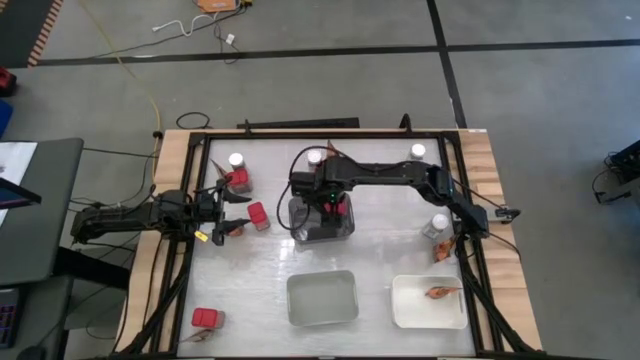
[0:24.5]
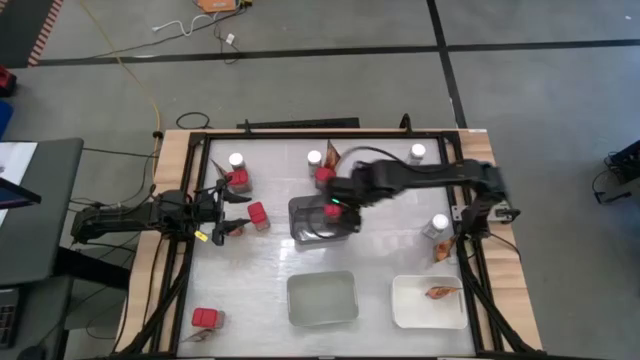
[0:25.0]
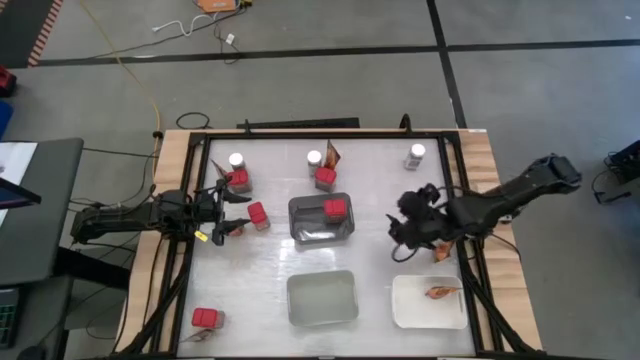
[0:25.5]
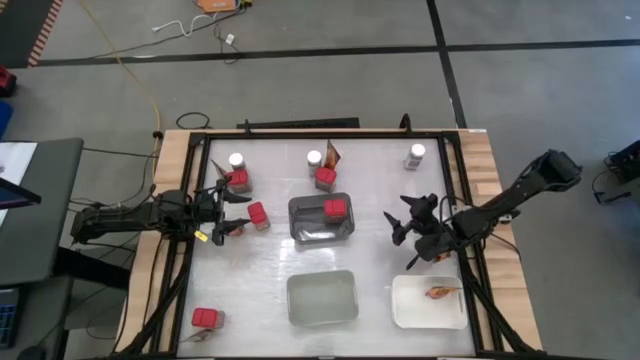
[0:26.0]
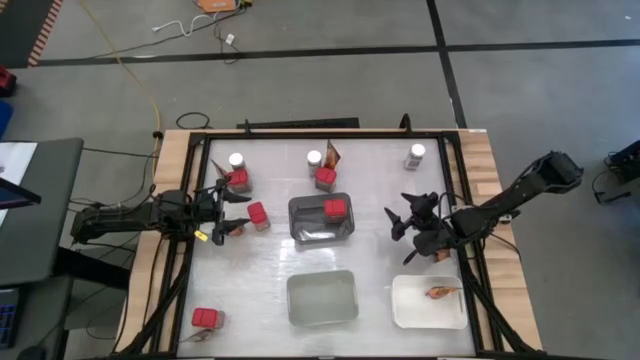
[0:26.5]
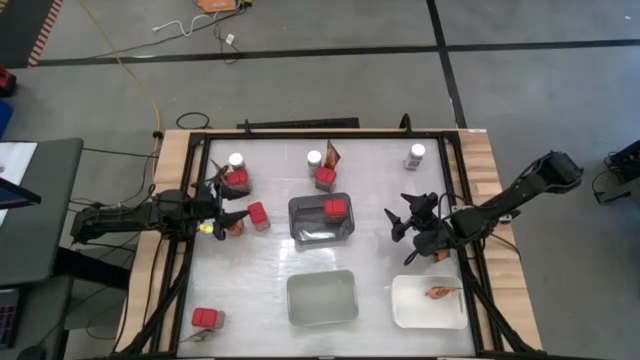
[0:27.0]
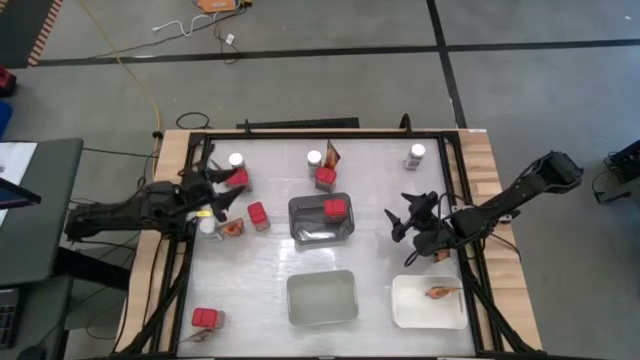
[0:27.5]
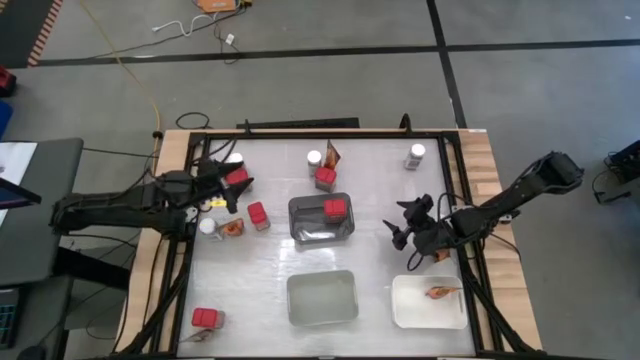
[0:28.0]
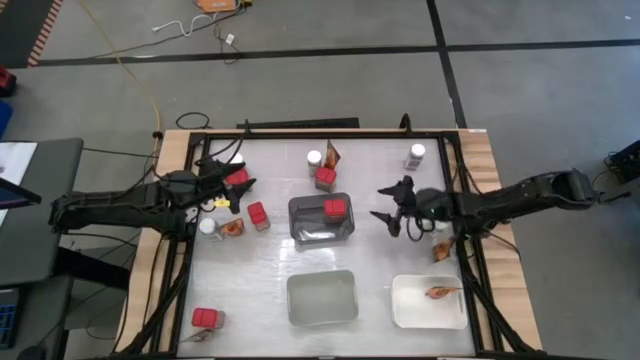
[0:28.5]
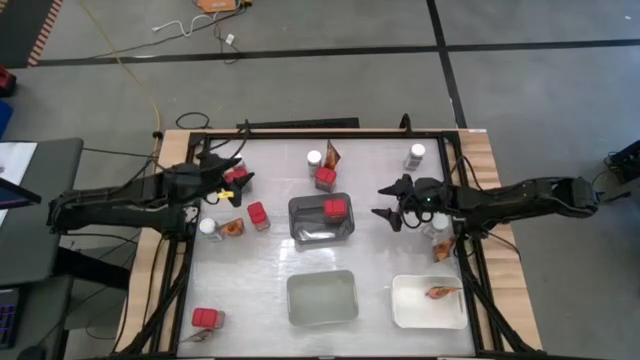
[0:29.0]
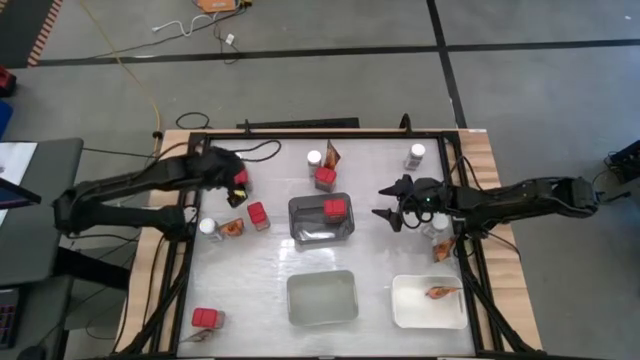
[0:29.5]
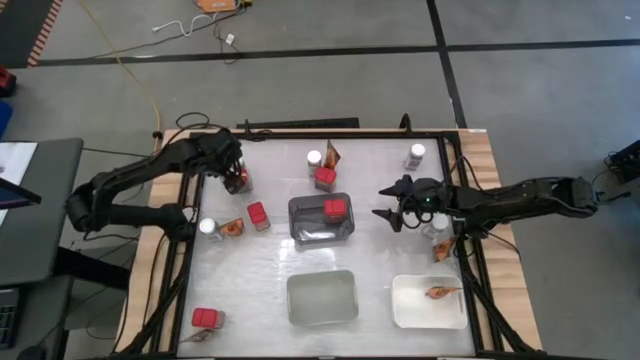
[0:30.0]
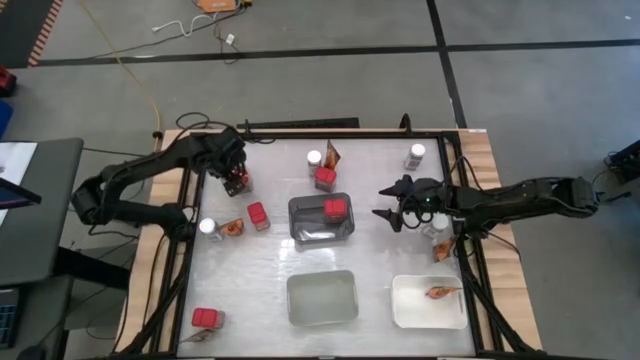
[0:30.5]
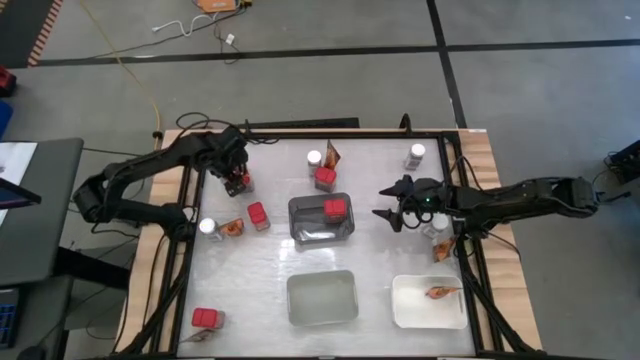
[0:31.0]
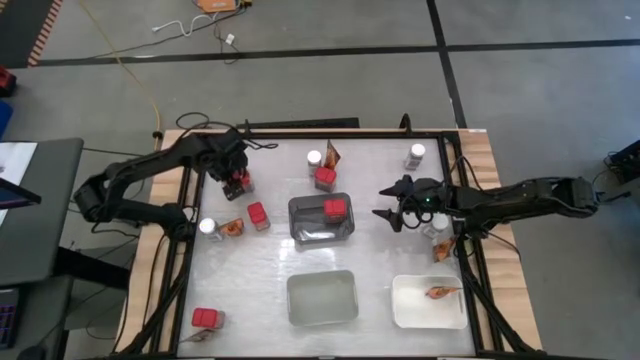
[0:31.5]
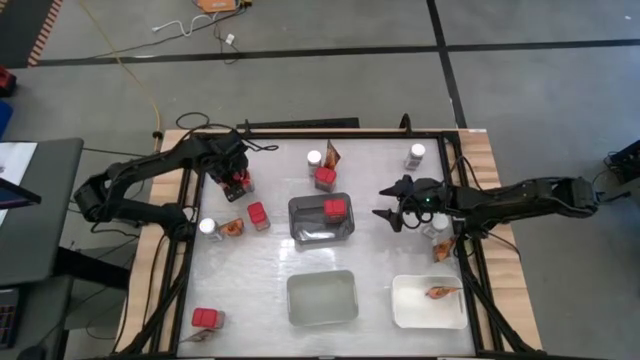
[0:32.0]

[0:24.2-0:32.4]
Task: Sort spices by type
Put the red seasoning can into the black bin

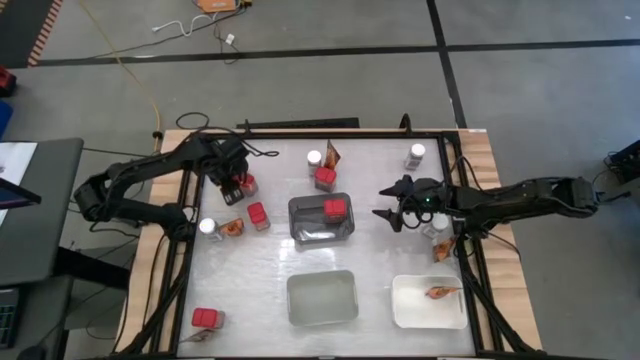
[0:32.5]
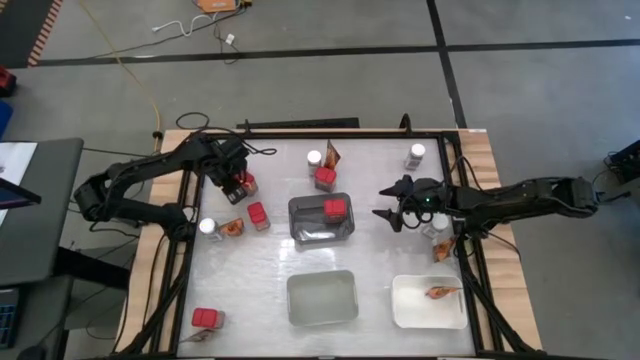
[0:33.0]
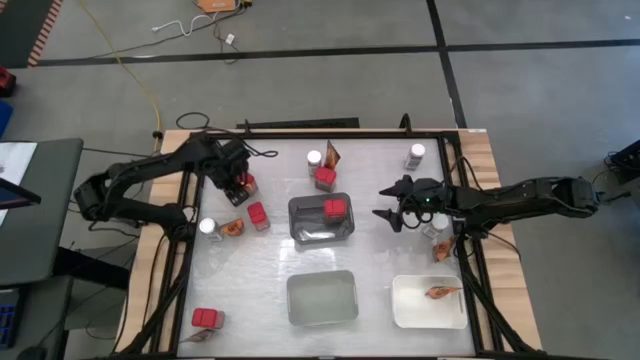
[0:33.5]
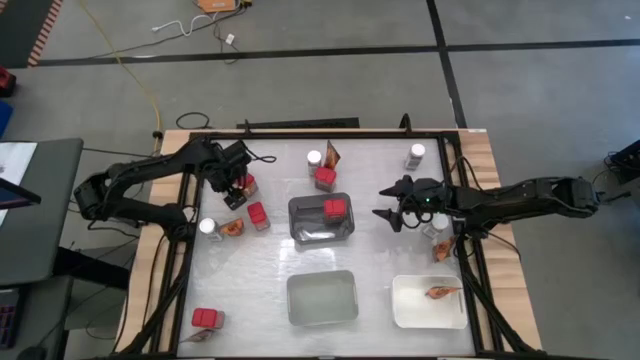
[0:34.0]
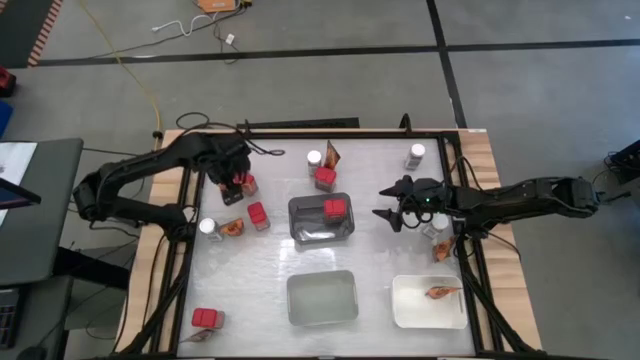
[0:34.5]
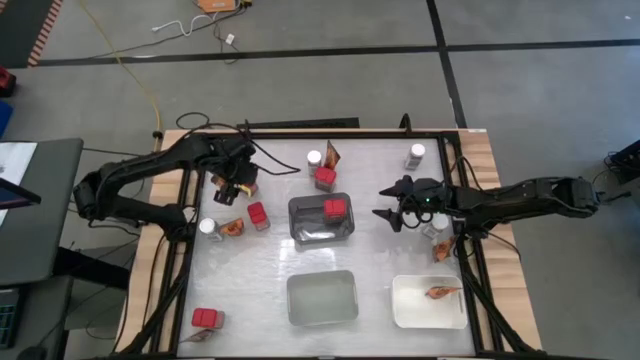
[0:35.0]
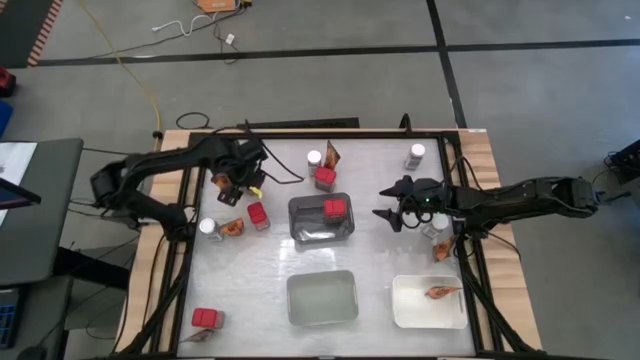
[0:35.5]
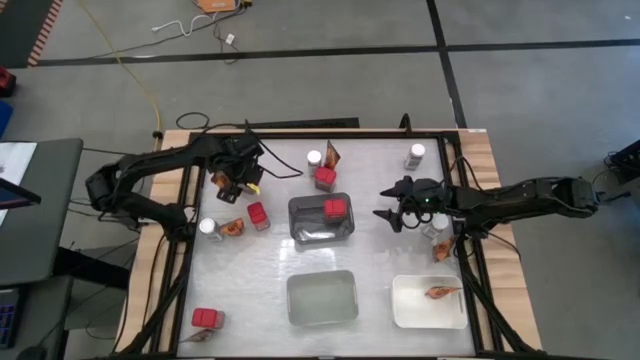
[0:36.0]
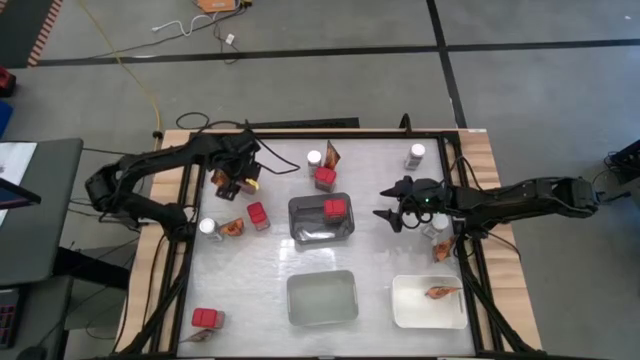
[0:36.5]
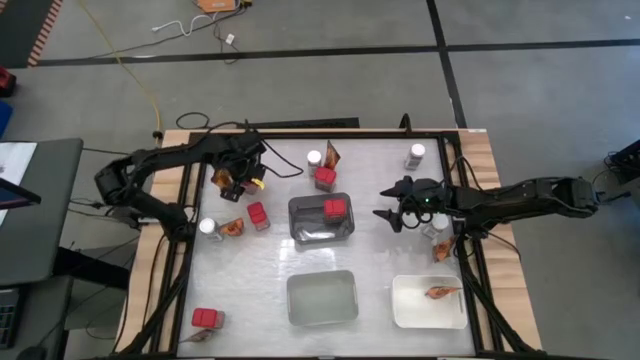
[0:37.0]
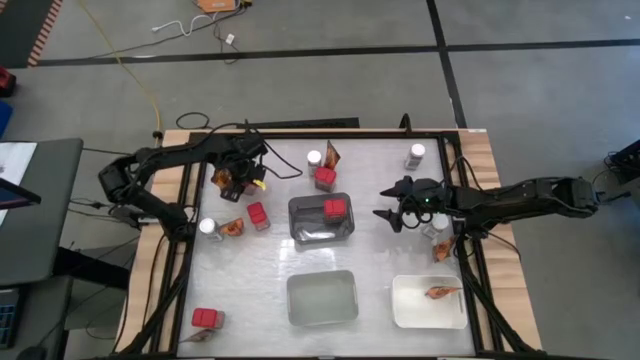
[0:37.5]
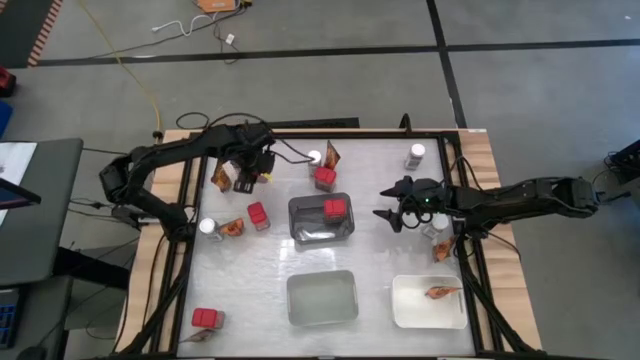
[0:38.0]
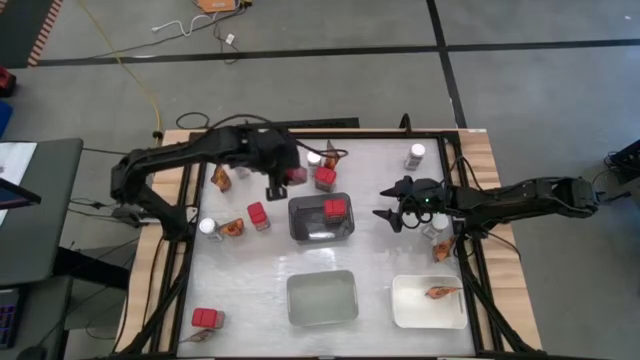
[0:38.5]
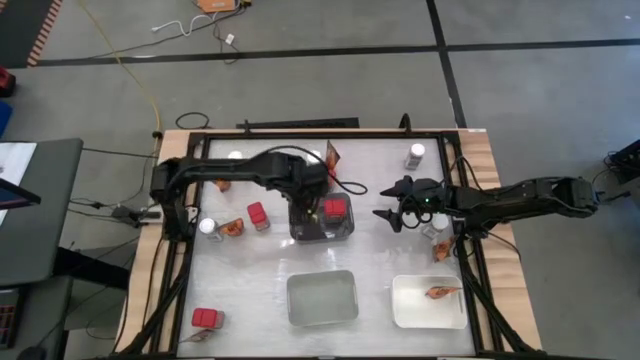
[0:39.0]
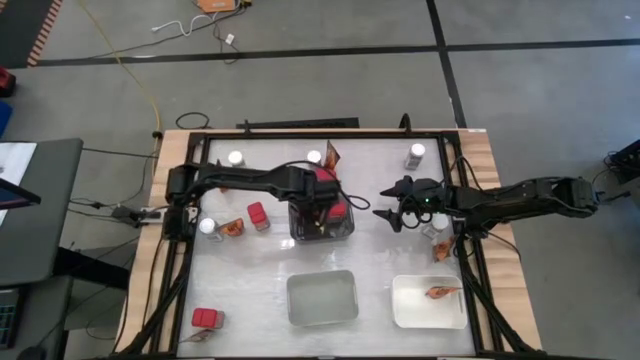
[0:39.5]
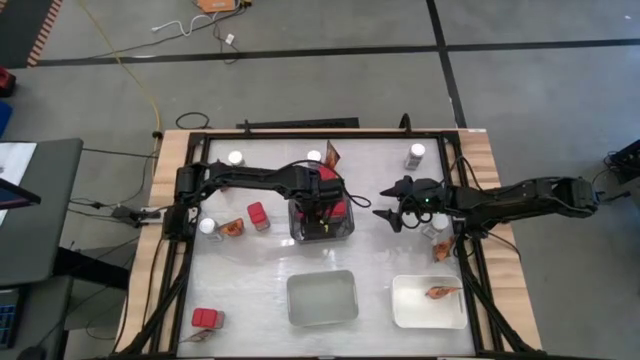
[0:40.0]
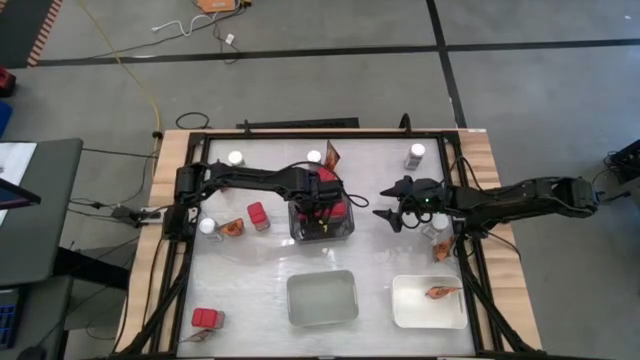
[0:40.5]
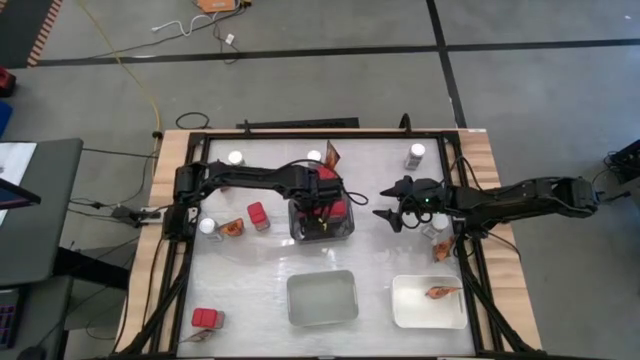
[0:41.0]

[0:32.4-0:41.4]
Put the red seasoning can into the black bin

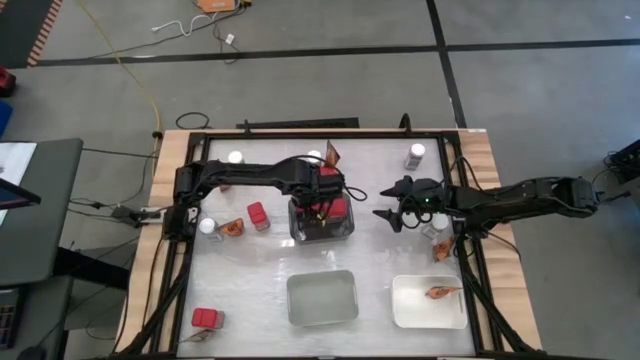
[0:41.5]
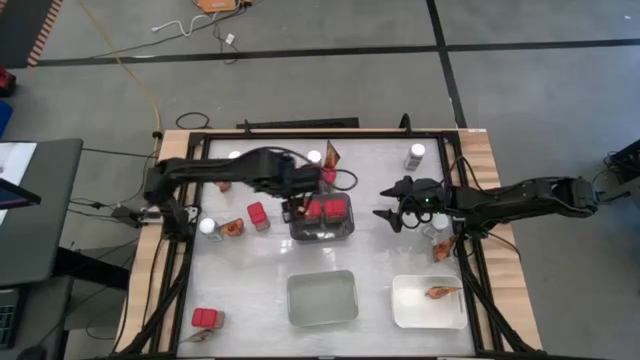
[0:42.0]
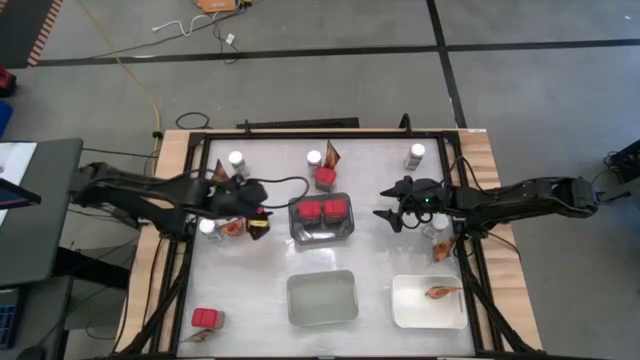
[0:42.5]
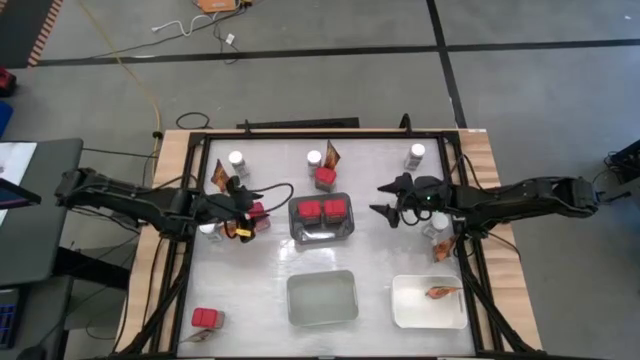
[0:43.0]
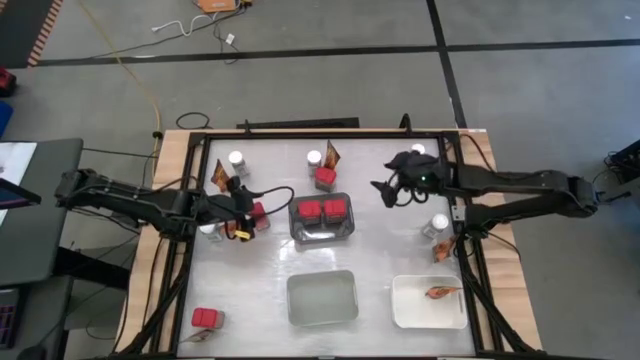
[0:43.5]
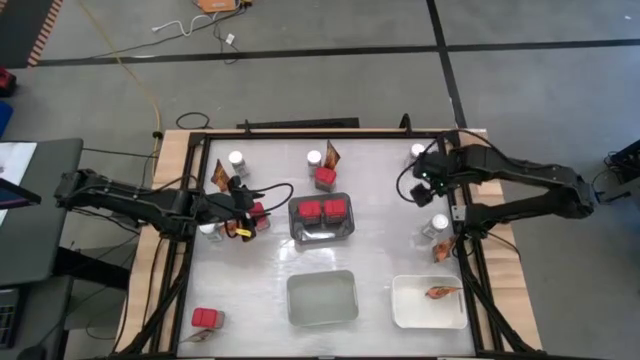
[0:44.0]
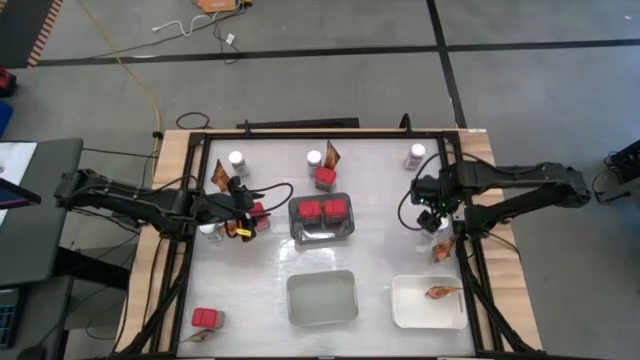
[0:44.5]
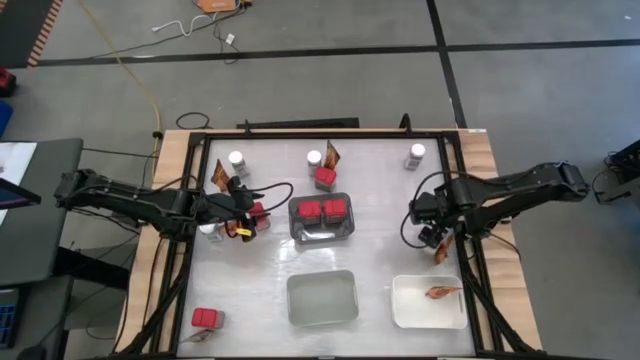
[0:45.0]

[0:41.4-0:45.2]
Put the white seasoning bottle into the gray bin
